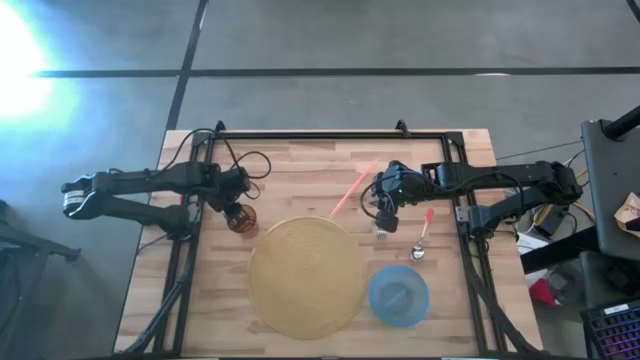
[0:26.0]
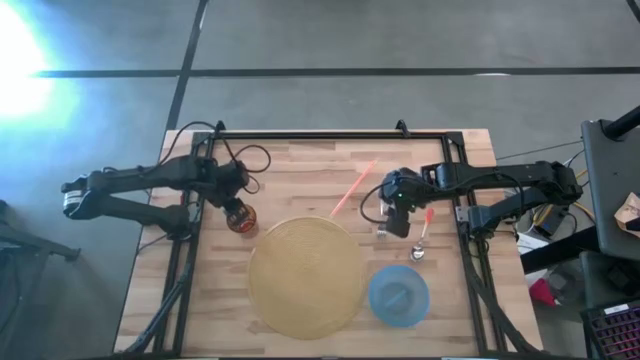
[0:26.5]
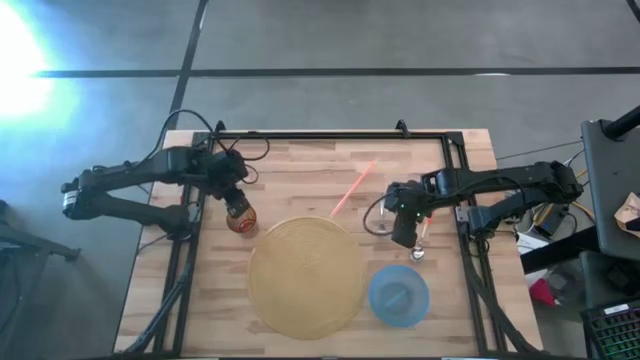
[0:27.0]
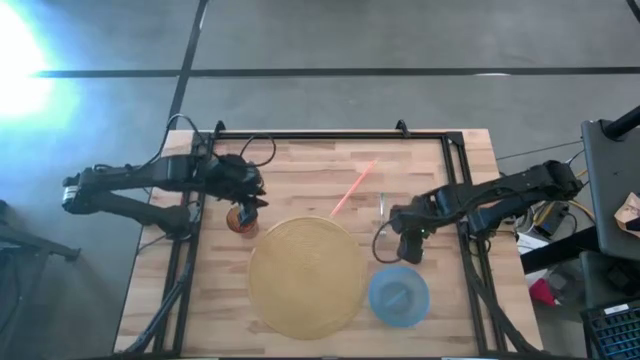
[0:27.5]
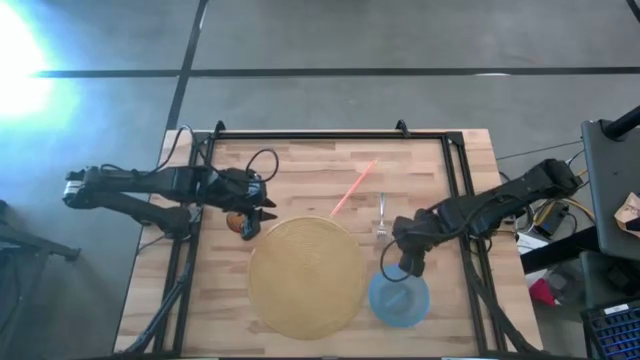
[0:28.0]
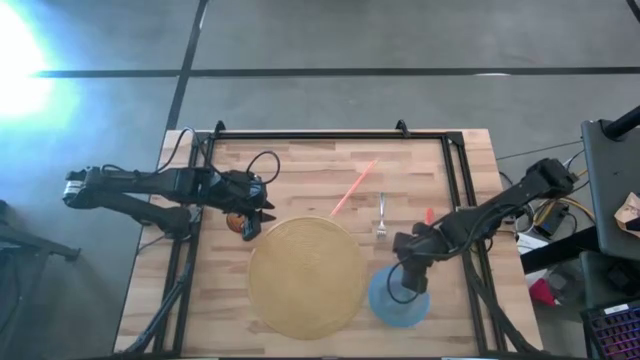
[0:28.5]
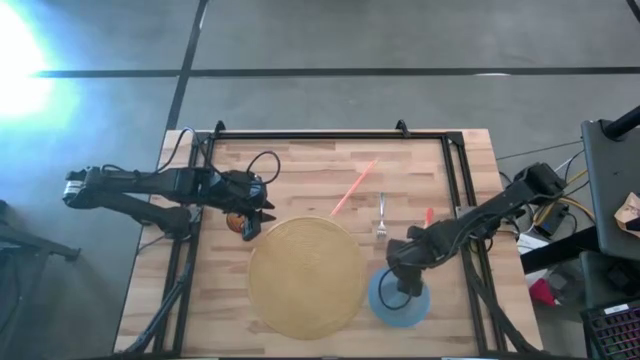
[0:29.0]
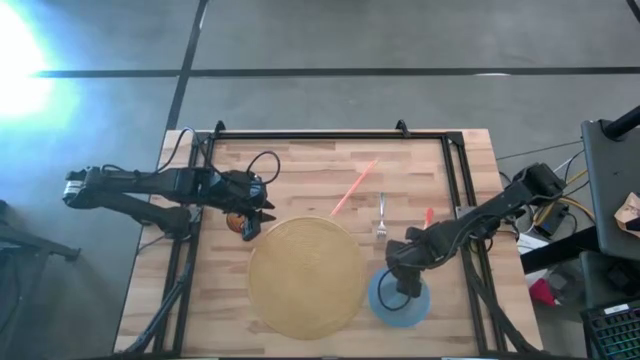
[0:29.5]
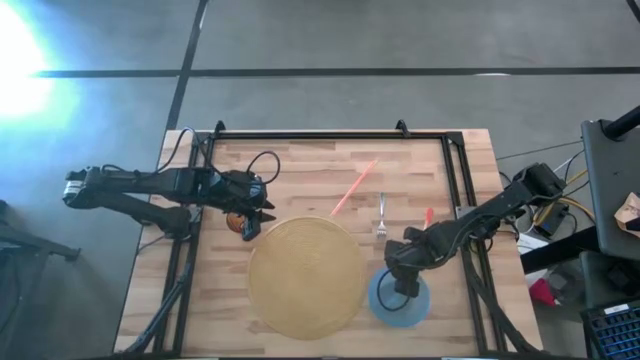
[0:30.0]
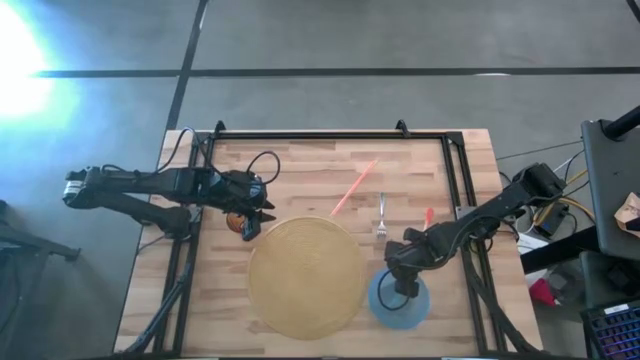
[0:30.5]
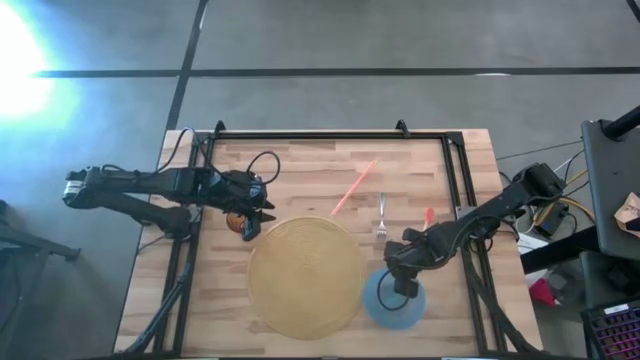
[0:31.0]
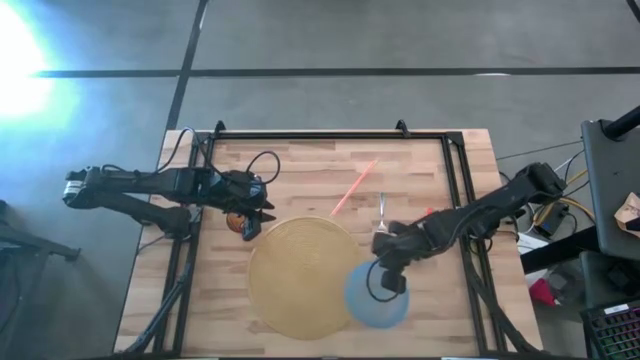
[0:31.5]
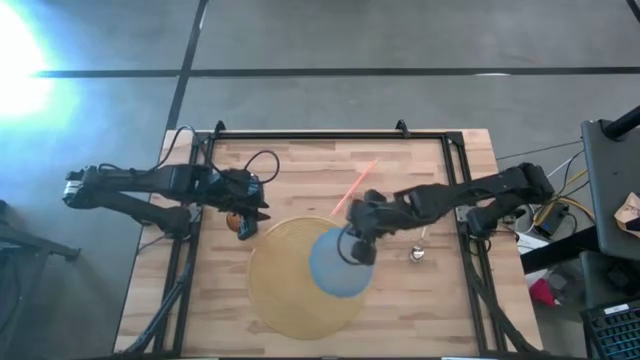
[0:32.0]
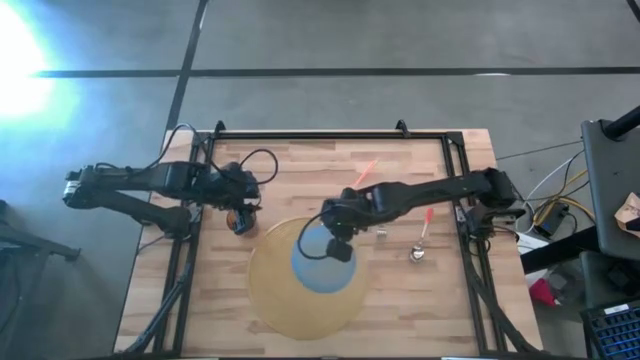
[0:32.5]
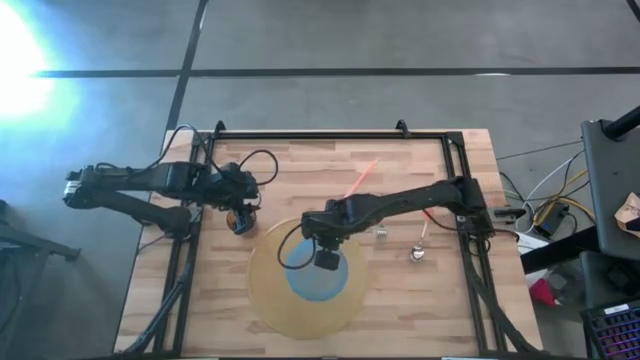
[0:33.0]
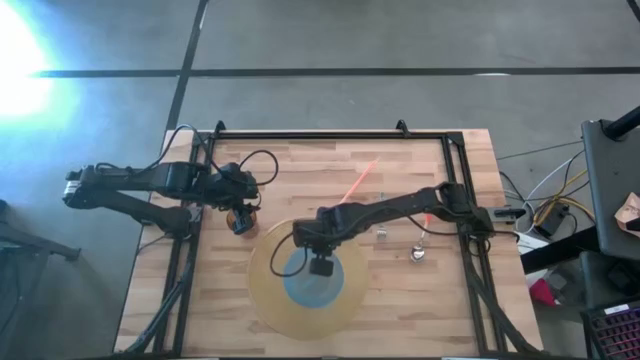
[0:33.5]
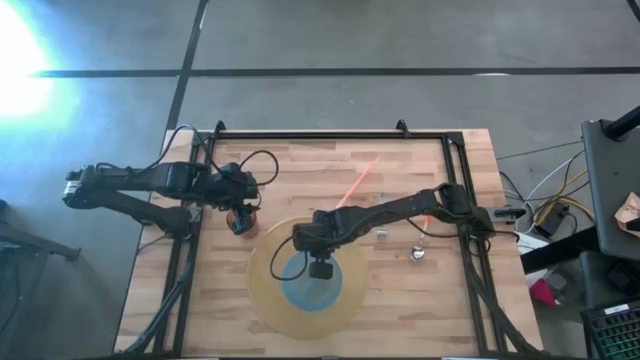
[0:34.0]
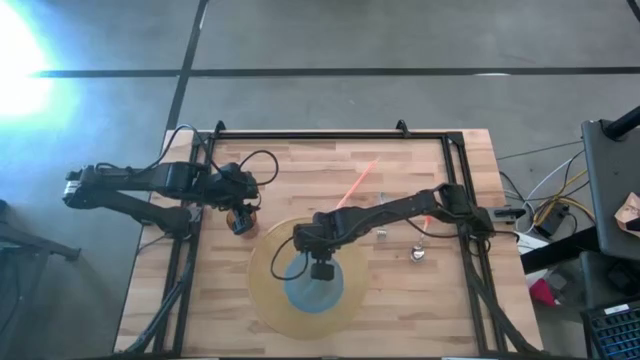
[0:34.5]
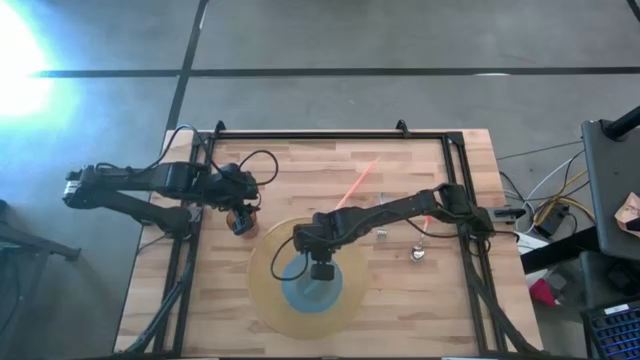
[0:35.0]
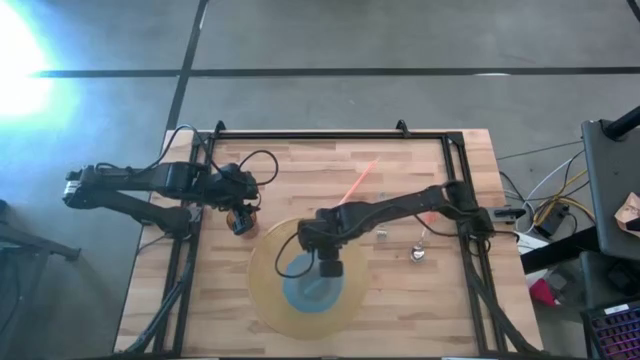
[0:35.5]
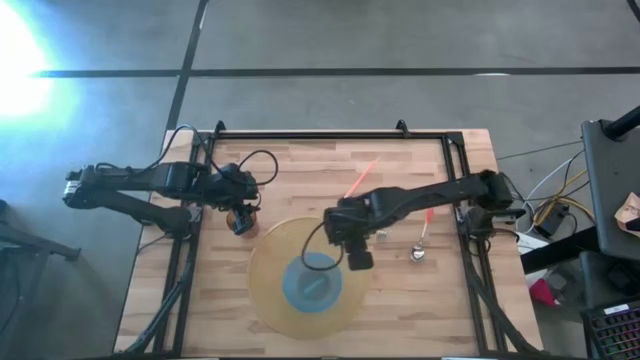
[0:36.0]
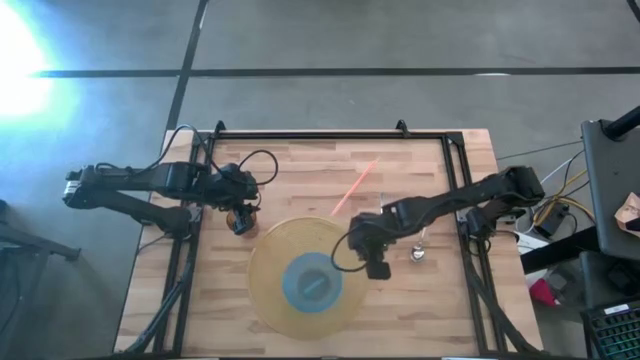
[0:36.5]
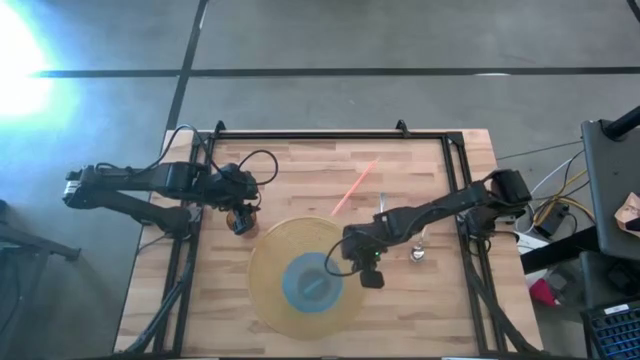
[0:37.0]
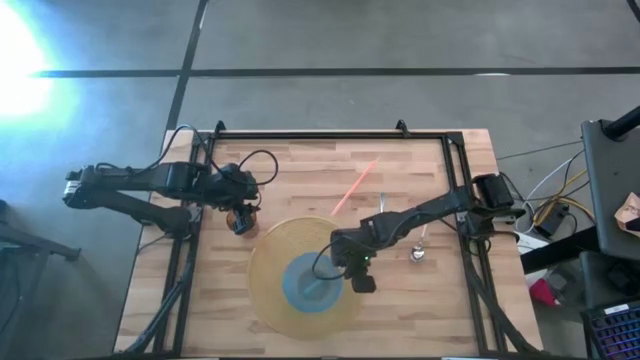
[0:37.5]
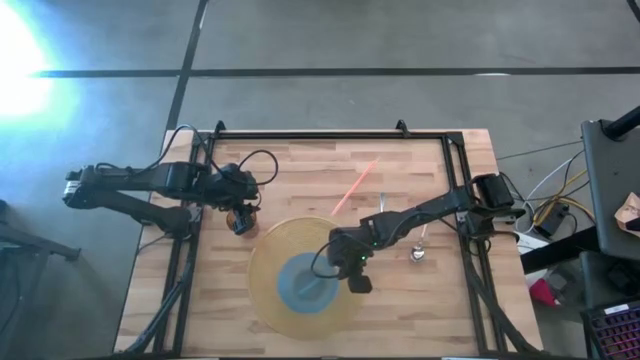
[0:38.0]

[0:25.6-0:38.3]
Task: Pick & Place Utensil
Put the blue bowl on the brown mat

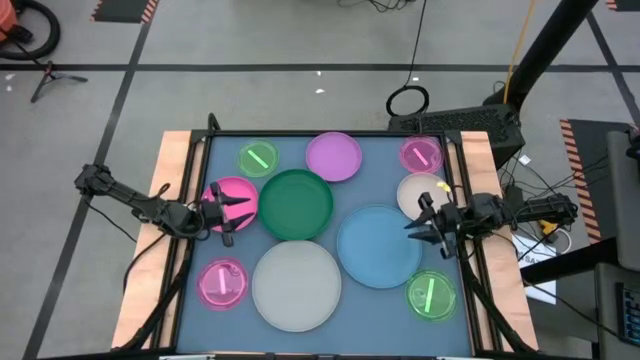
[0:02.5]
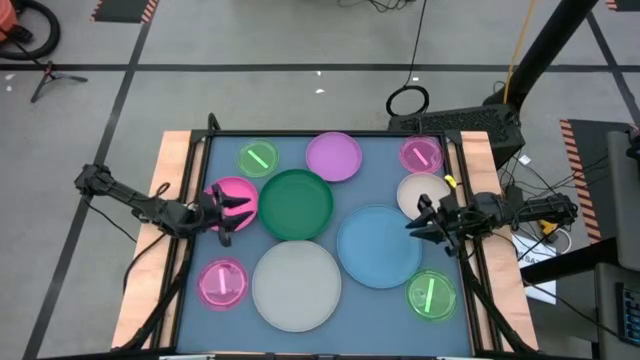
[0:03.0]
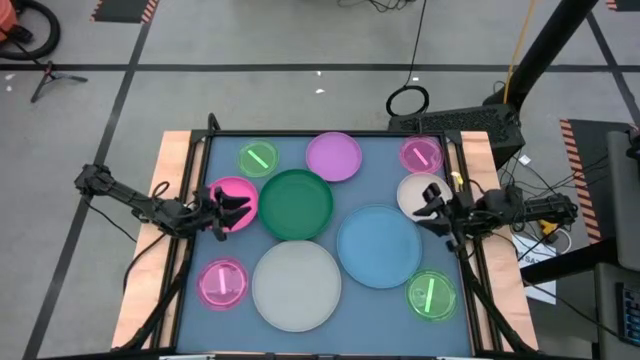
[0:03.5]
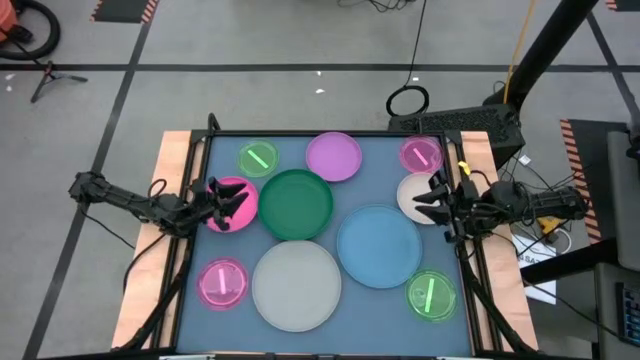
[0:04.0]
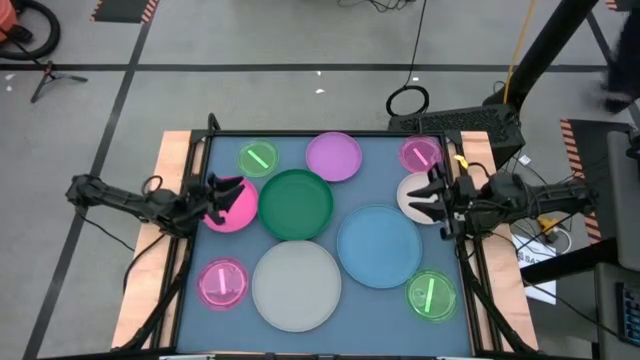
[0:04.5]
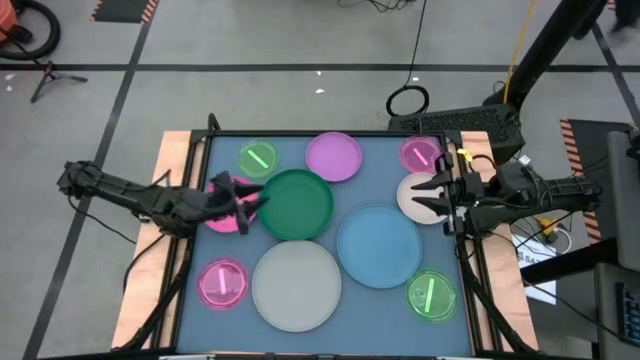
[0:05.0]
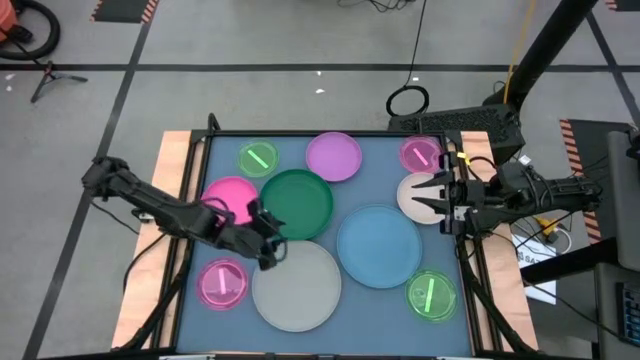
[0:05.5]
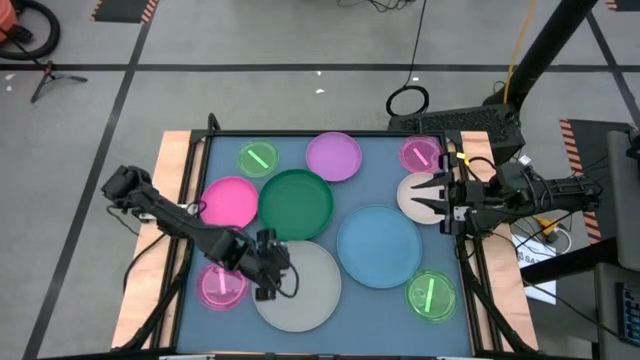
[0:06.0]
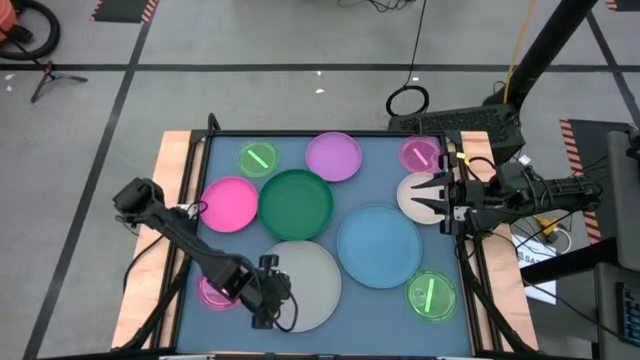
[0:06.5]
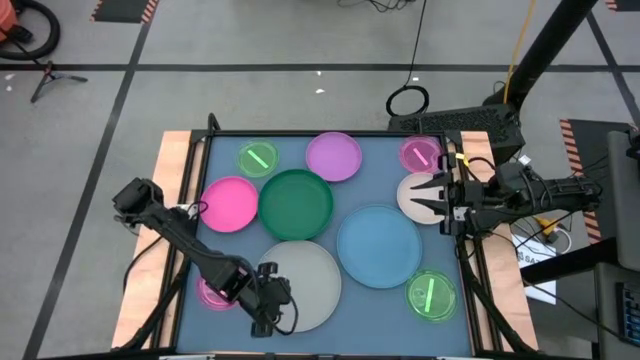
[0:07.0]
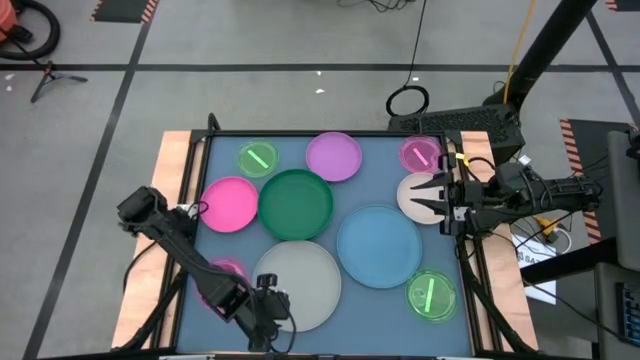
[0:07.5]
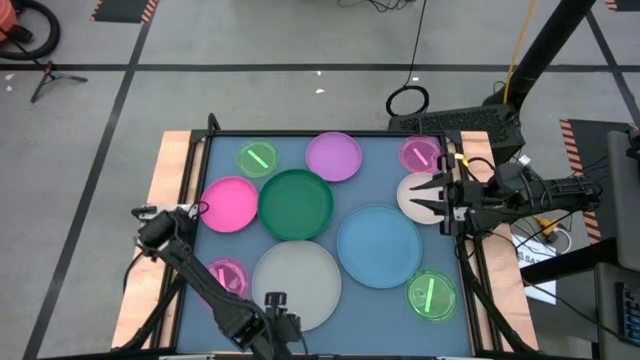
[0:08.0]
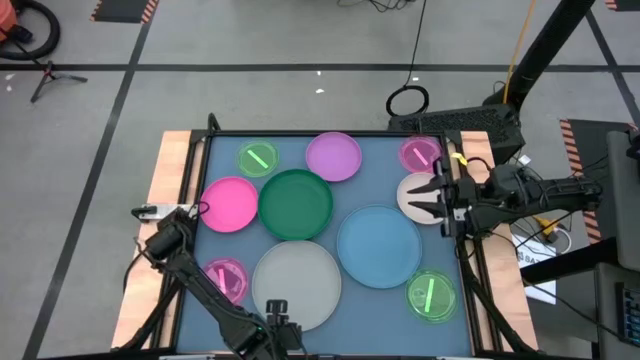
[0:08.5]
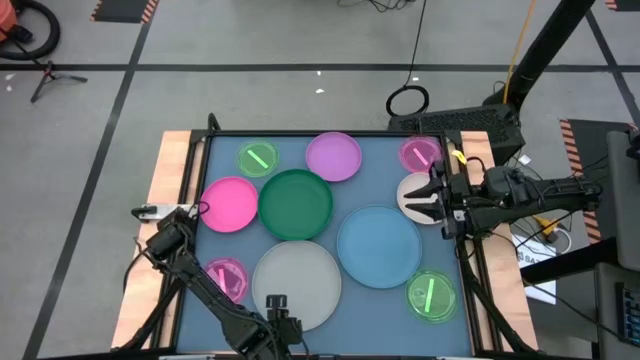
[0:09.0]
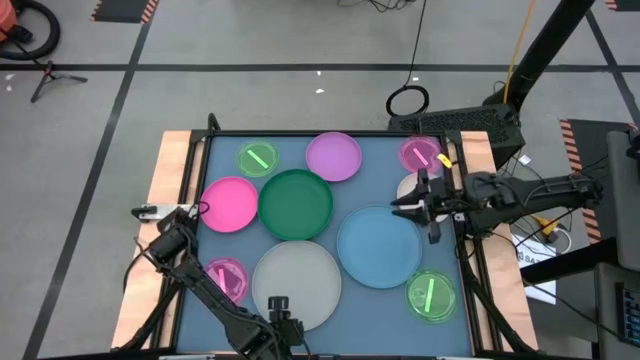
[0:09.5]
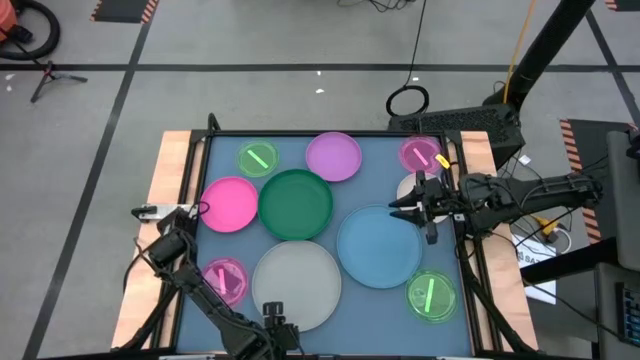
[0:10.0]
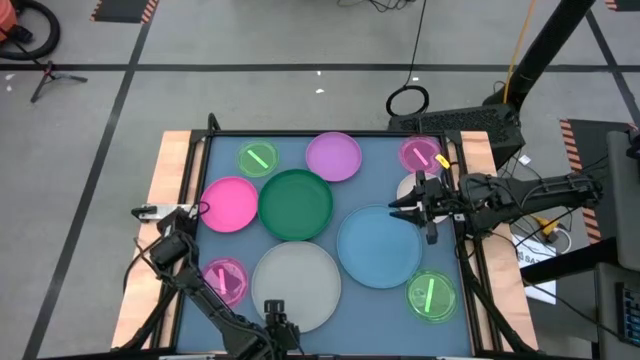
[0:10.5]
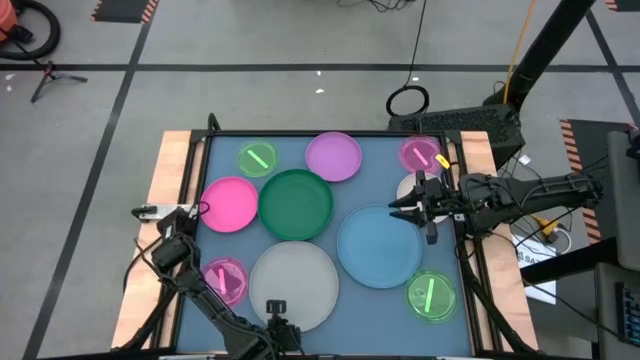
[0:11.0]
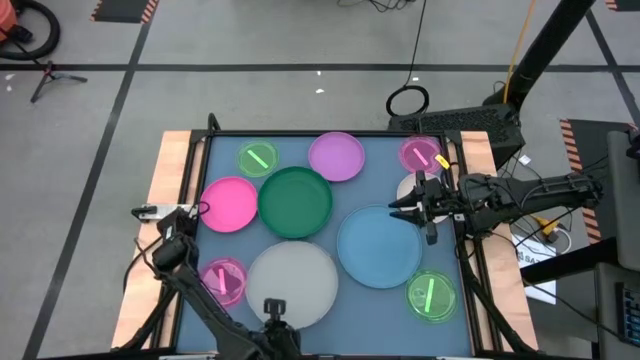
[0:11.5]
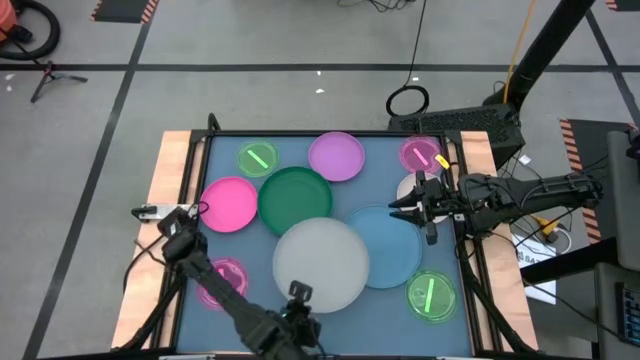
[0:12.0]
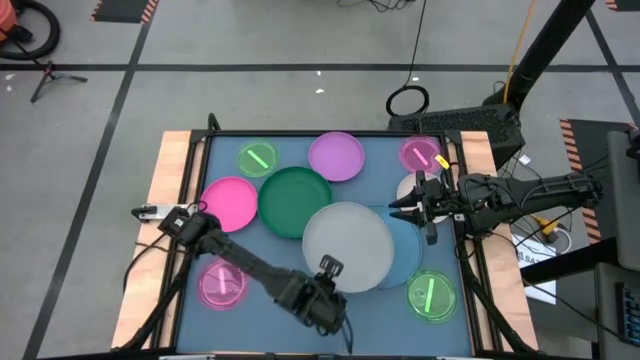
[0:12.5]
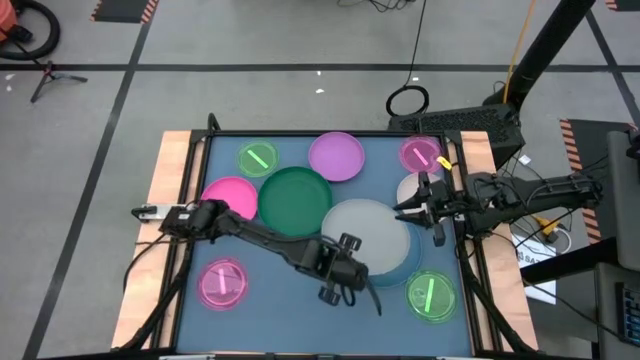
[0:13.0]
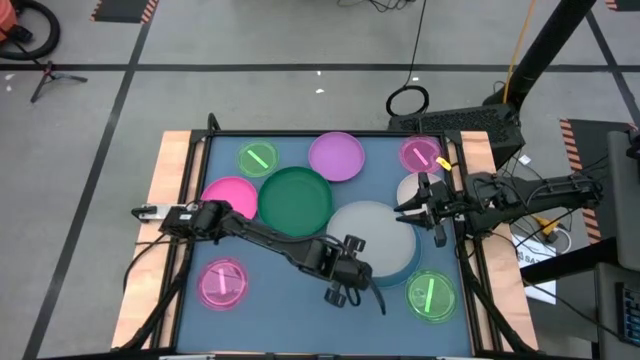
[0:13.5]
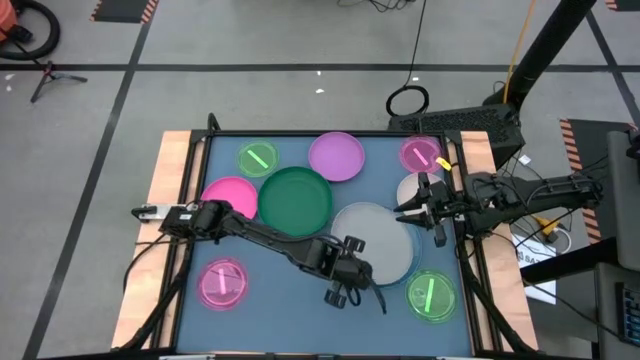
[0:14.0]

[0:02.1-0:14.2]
Task: Stack plastic plates
Stack the gray plate on top of the blue plate
